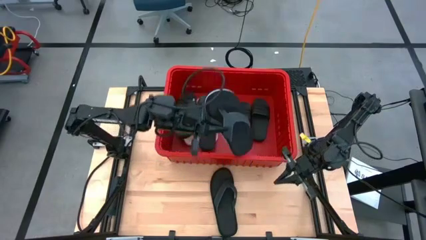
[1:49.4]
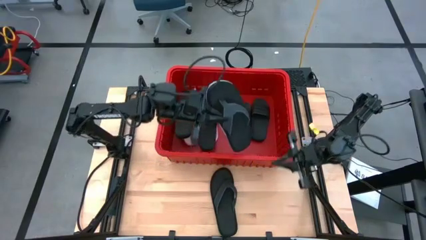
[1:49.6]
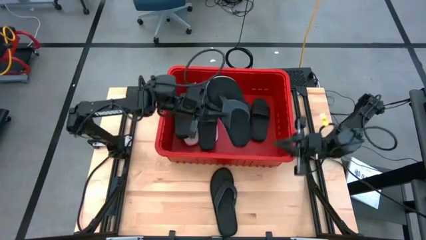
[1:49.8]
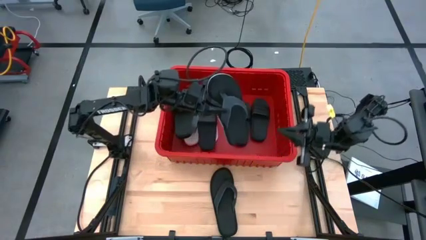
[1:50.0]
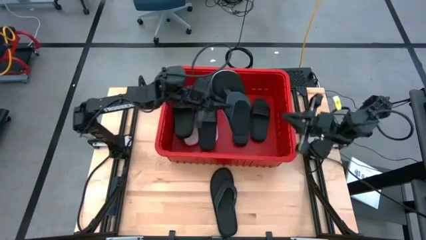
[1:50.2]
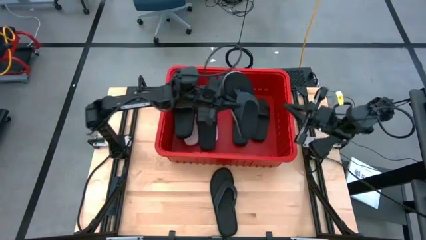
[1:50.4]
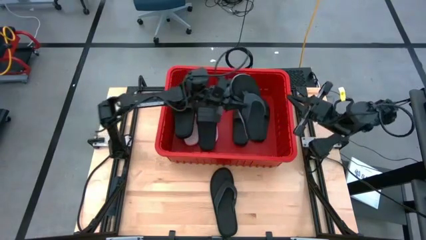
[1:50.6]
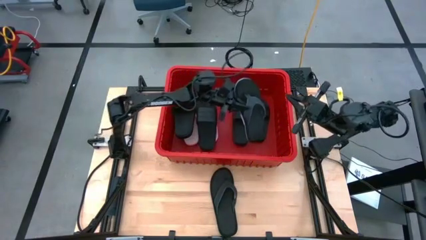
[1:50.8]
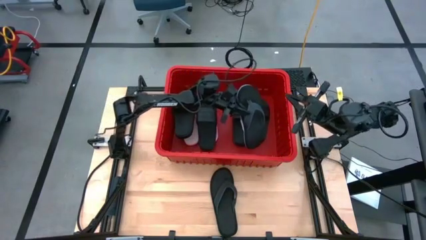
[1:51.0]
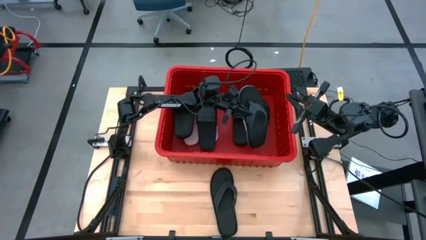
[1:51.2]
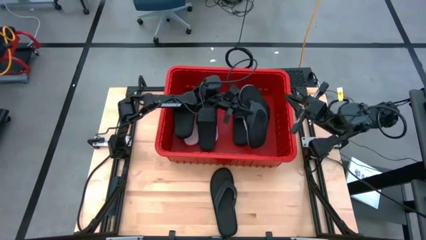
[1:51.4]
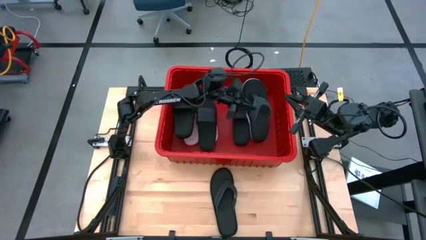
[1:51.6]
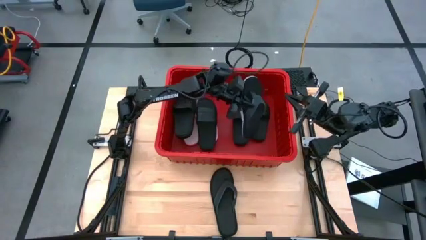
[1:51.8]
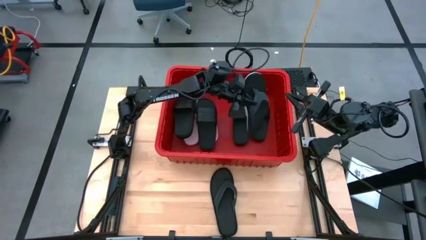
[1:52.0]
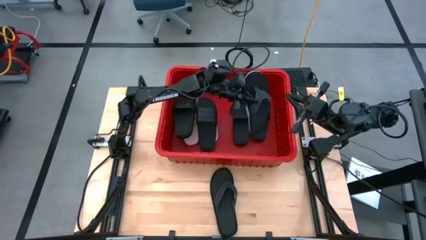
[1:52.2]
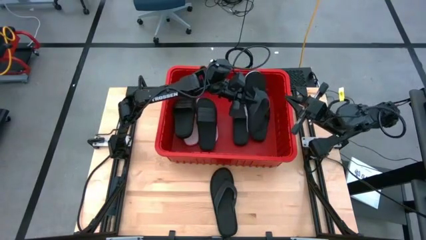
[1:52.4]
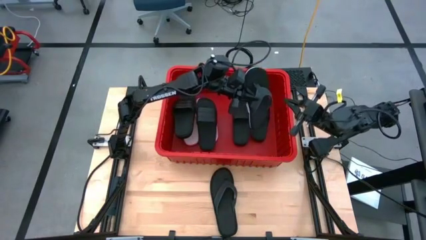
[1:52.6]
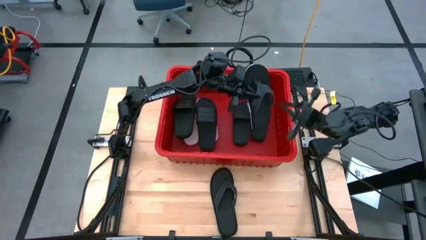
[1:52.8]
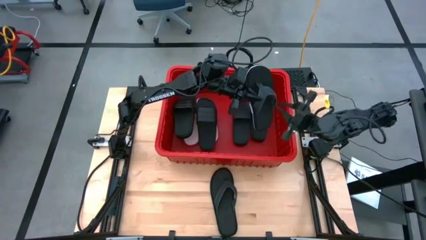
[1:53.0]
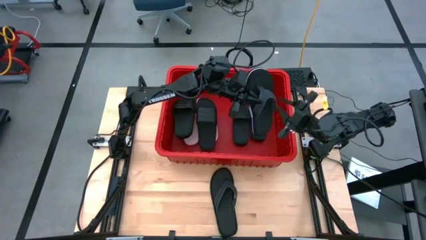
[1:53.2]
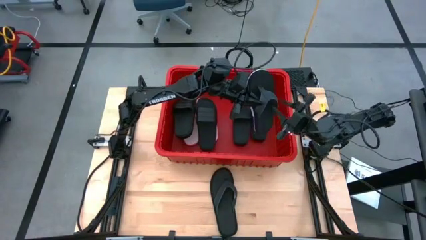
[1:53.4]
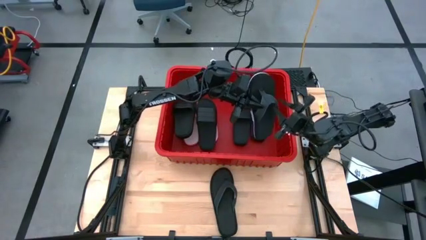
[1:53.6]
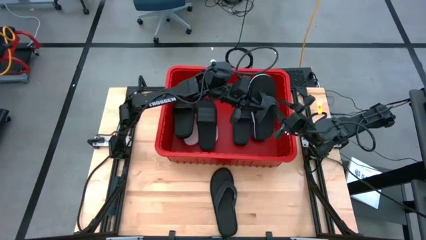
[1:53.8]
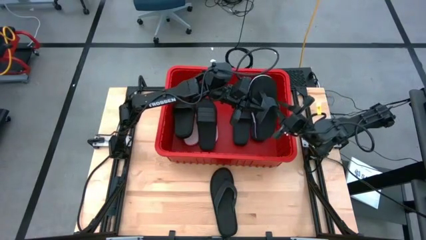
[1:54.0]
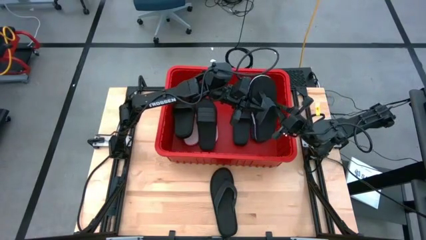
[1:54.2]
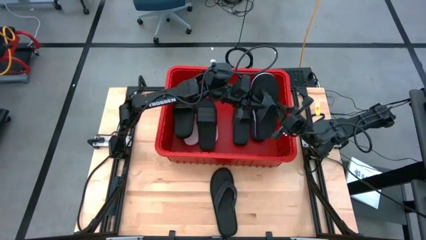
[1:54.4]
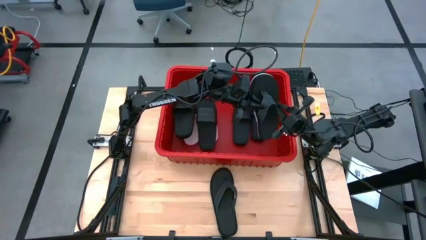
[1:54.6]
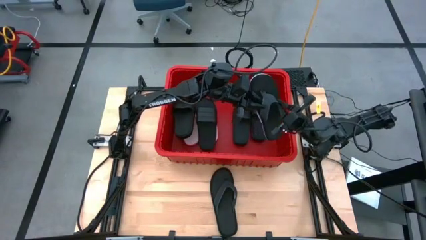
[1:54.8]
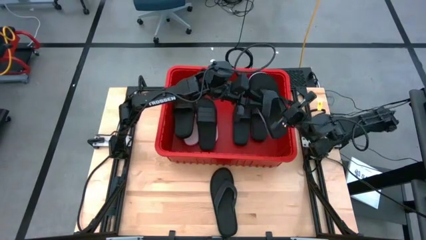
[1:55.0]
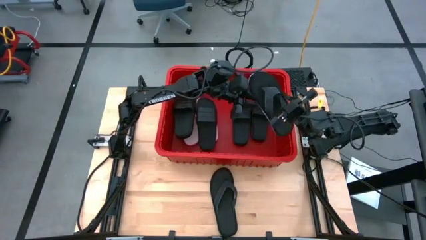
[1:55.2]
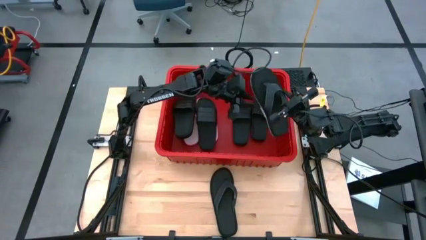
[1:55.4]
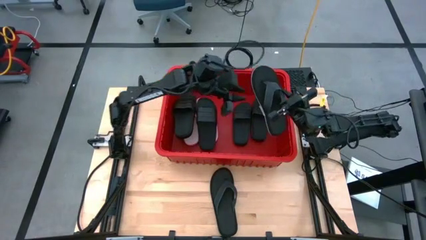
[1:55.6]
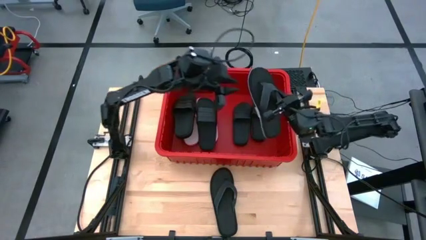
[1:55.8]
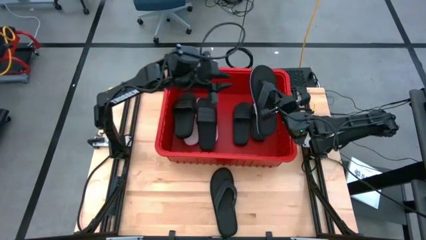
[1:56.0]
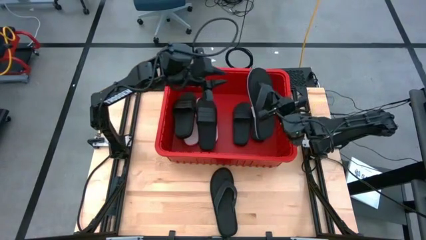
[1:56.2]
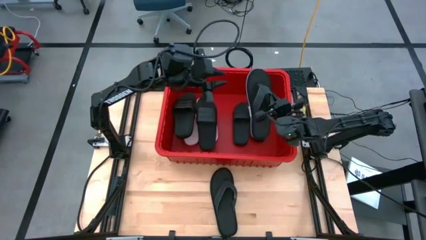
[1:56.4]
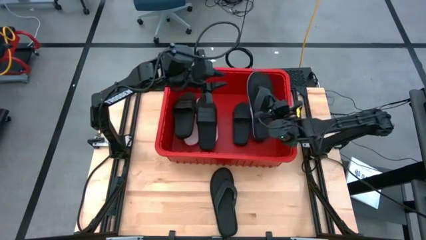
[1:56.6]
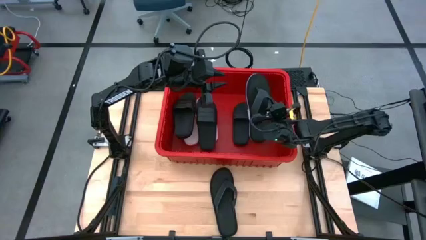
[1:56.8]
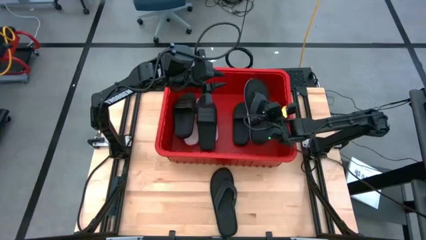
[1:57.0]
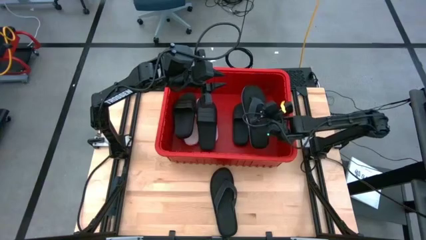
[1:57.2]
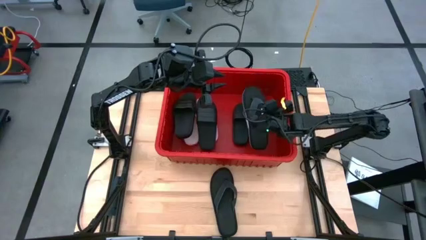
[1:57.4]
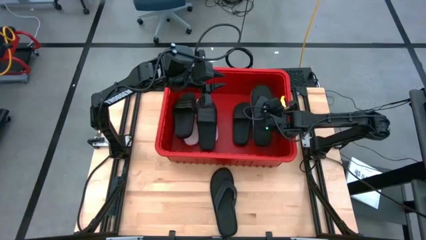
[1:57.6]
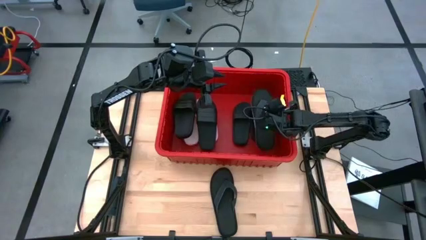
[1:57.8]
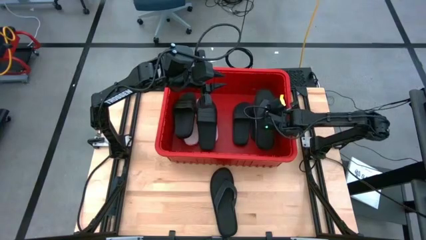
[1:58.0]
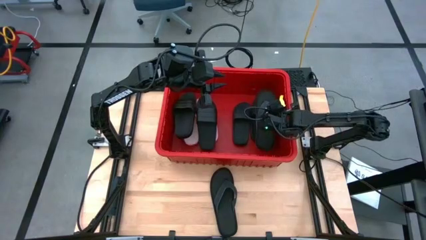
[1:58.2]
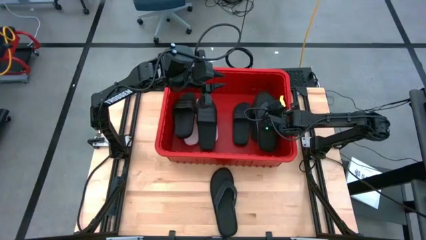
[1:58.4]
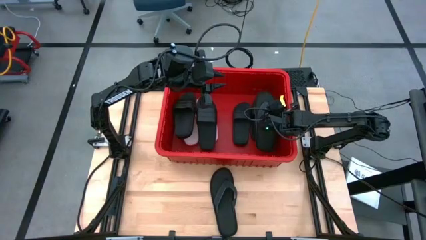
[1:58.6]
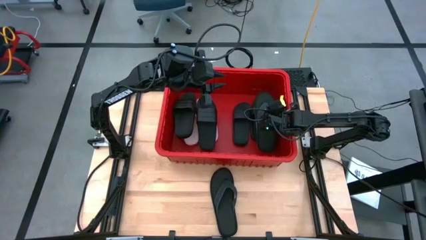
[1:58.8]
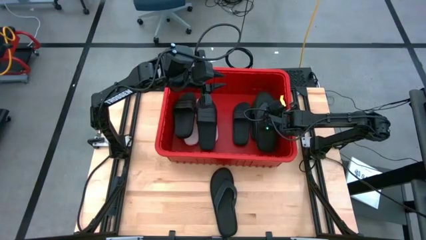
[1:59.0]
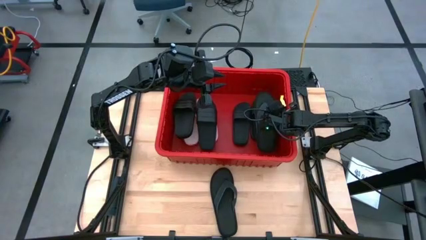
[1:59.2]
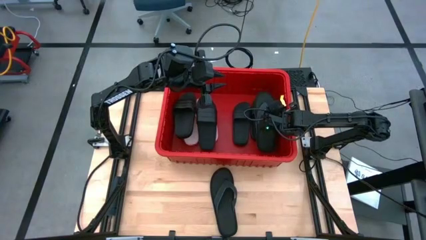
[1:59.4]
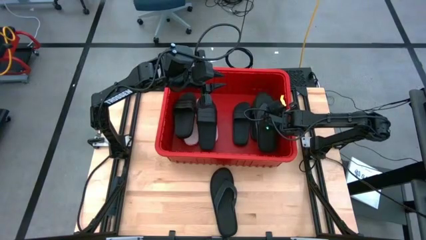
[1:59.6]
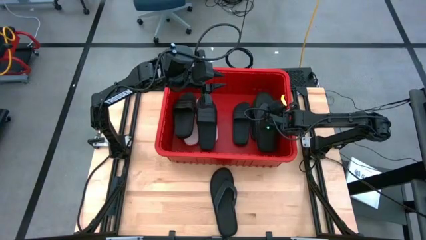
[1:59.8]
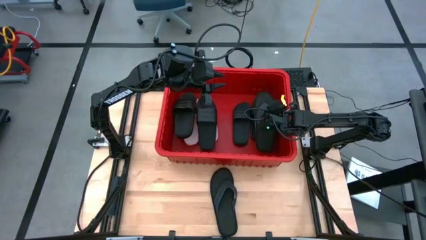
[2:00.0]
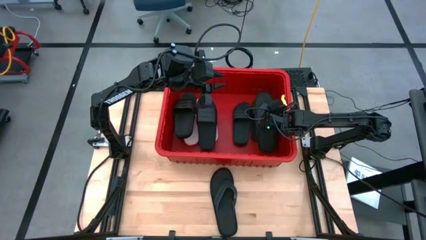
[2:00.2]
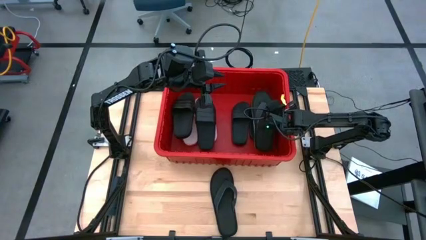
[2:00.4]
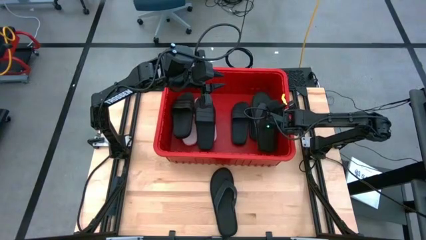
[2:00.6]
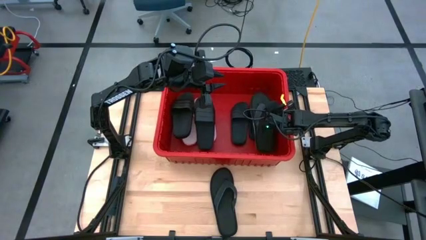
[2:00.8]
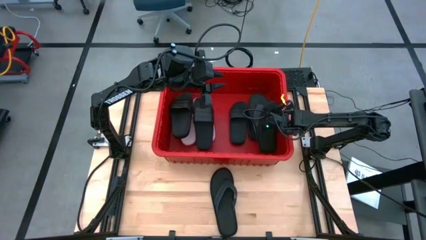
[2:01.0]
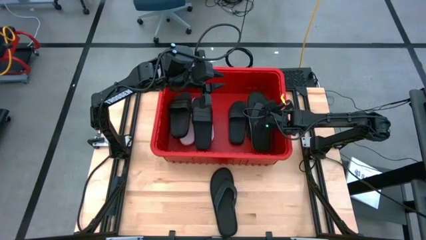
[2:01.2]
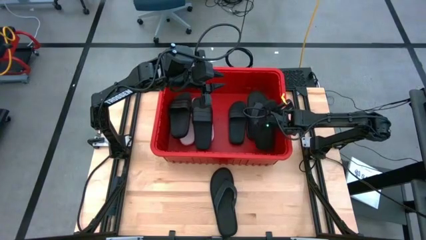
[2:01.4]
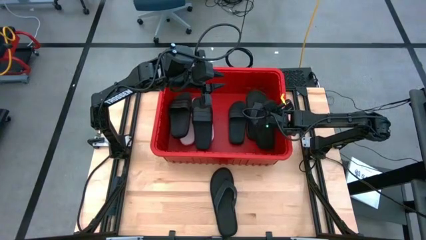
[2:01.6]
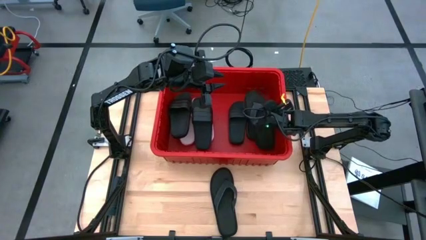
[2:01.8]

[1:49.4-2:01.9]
Task: Pick and place slides into bin
Put the right slipper into the bin

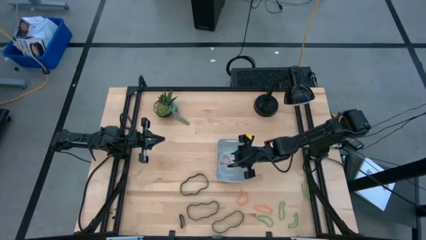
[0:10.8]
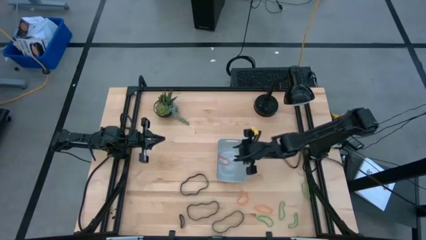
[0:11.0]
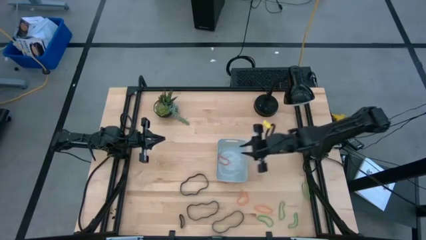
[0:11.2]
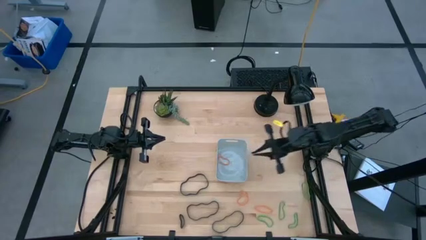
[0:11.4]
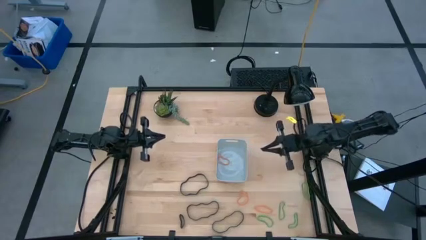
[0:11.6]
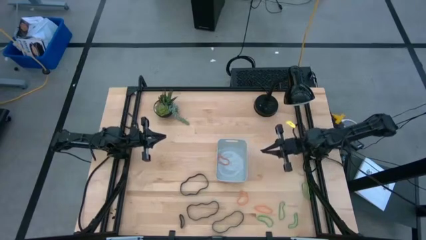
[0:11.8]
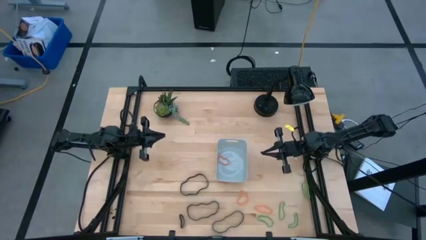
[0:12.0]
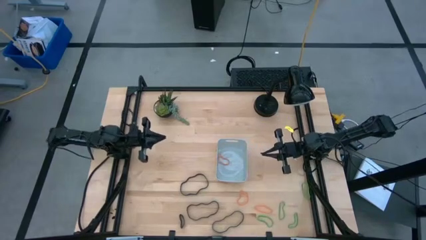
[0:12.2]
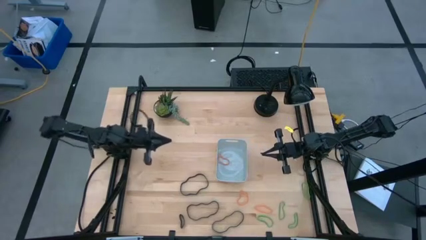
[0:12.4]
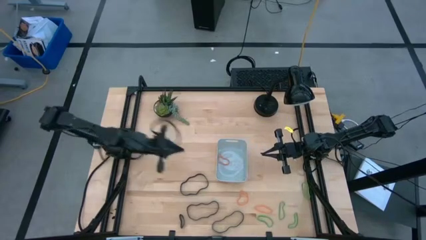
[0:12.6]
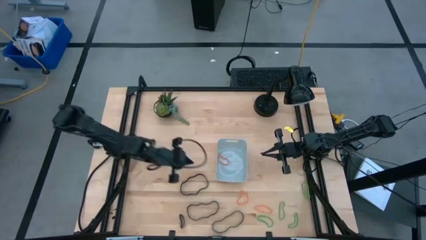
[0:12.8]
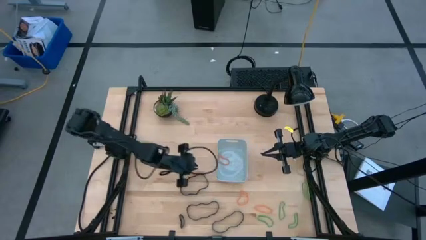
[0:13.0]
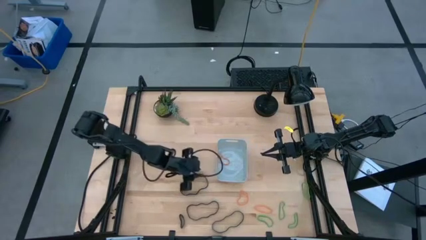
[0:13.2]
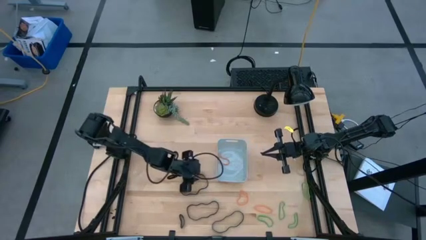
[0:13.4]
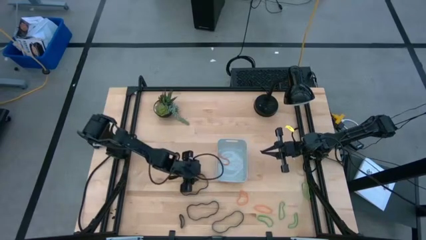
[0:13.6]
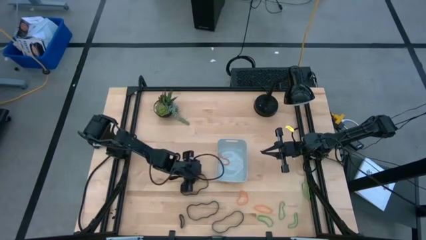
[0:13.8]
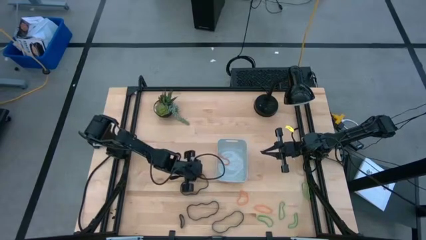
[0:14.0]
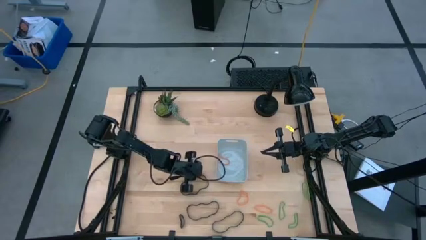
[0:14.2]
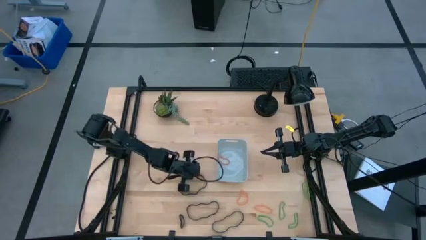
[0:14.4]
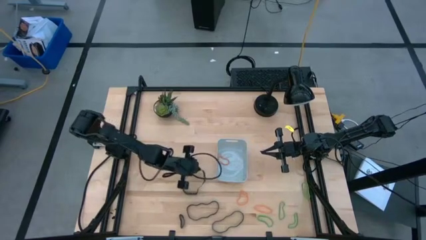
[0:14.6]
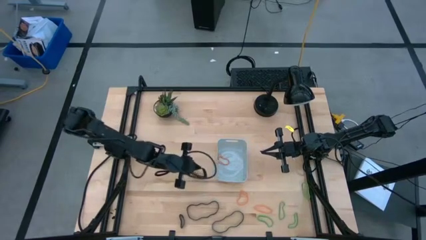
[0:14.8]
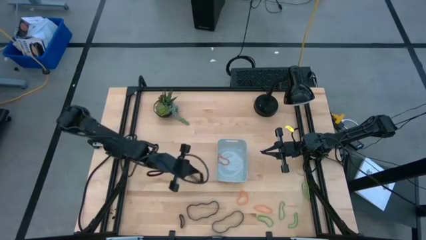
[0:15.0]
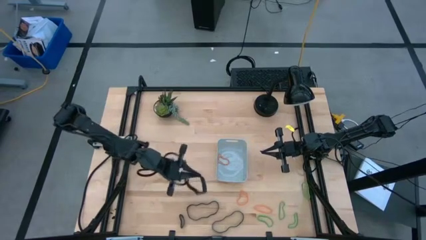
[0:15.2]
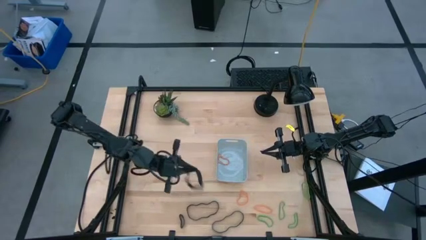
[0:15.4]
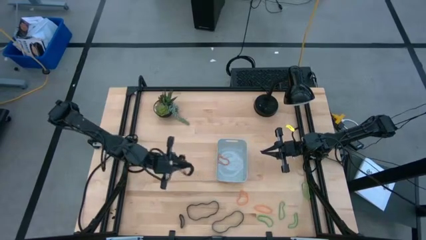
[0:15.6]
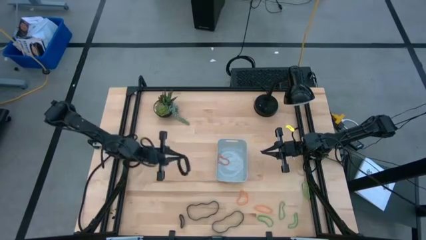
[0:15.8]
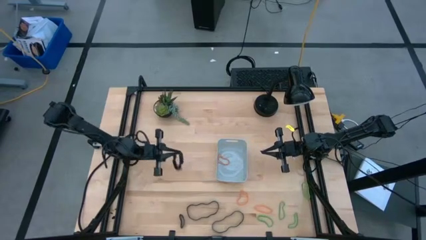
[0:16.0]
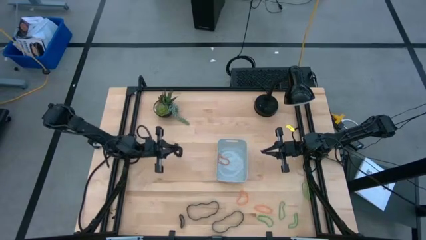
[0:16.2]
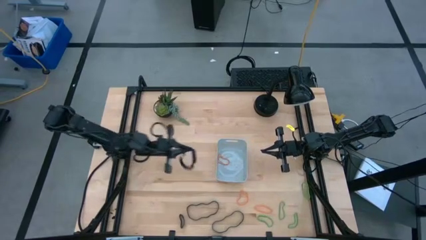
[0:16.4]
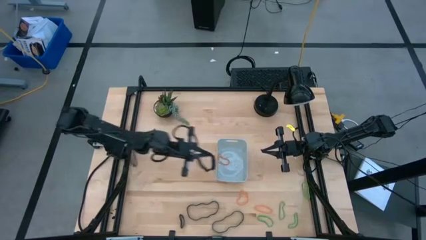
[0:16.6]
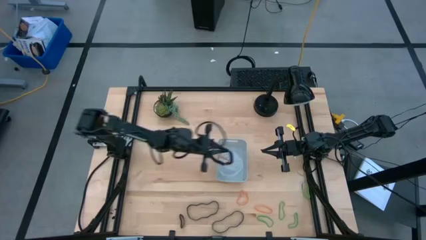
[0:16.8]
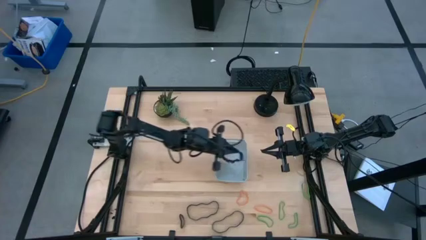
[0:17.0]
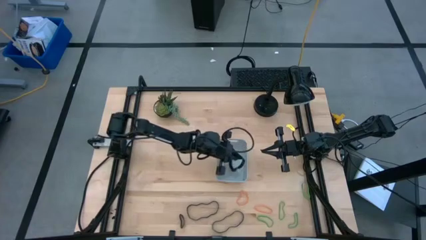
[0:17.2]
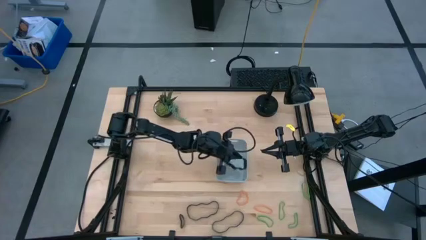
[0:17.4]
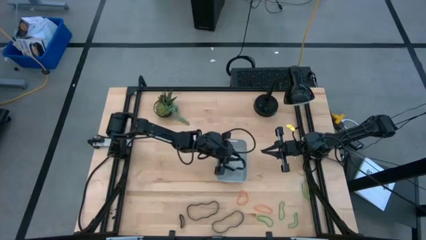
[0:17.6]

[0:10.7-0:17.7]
Task: Pick and place rubber bands into bin
Put the black rubber band into the white bin
